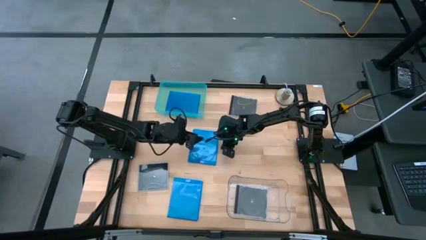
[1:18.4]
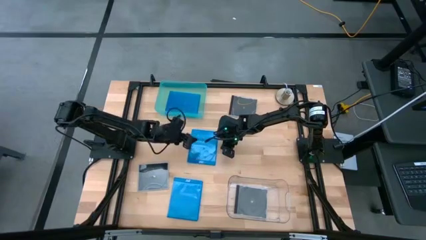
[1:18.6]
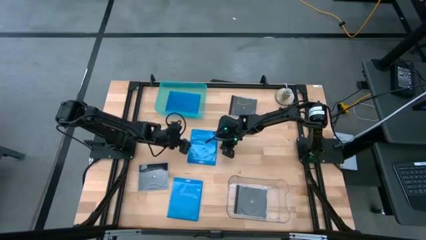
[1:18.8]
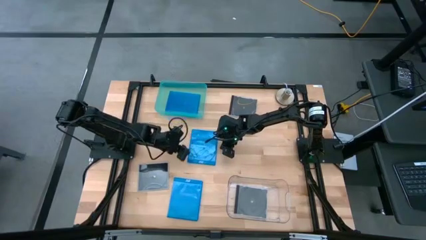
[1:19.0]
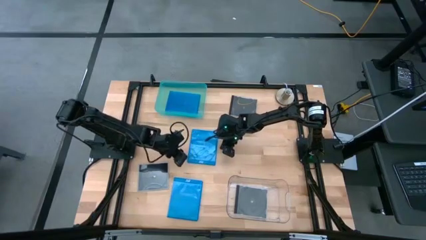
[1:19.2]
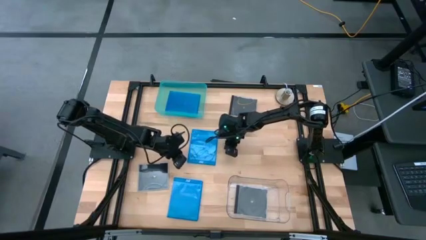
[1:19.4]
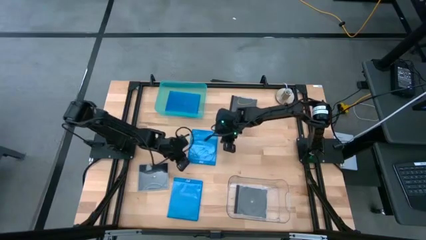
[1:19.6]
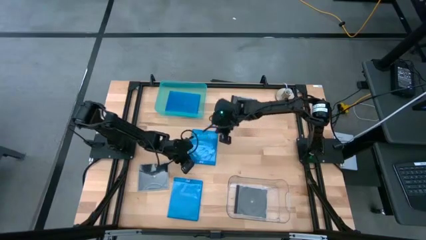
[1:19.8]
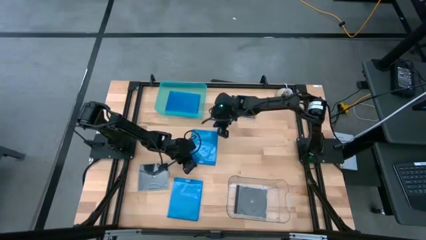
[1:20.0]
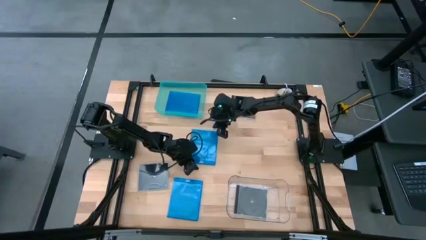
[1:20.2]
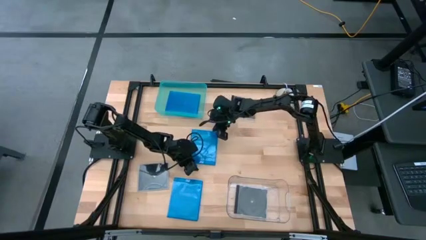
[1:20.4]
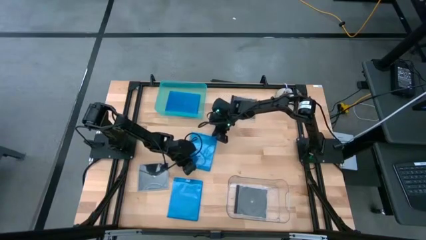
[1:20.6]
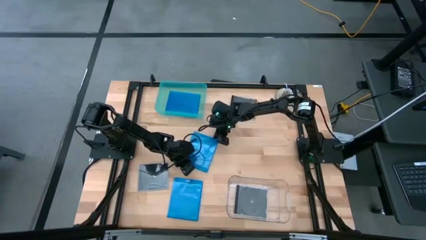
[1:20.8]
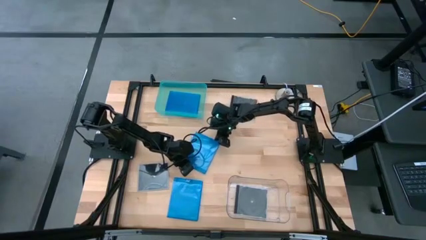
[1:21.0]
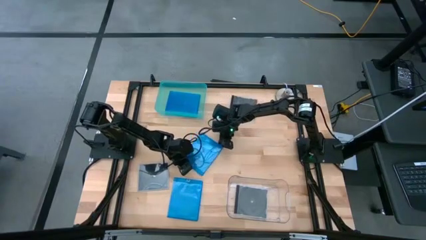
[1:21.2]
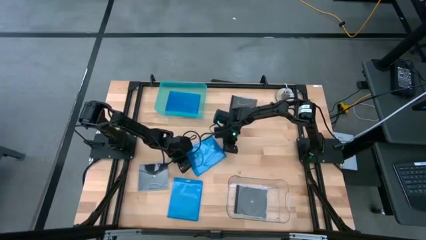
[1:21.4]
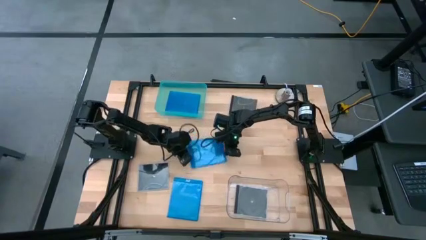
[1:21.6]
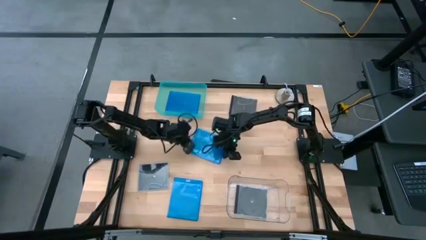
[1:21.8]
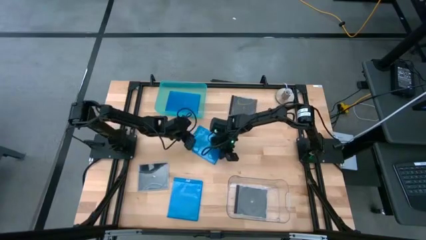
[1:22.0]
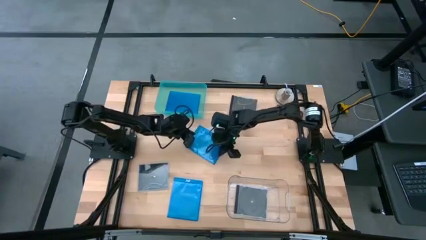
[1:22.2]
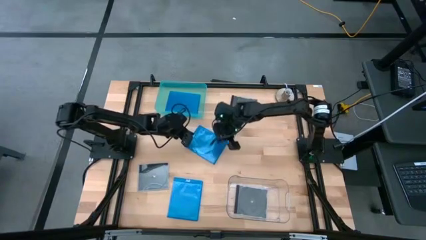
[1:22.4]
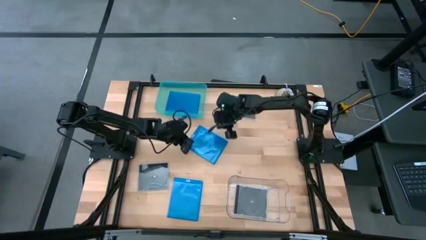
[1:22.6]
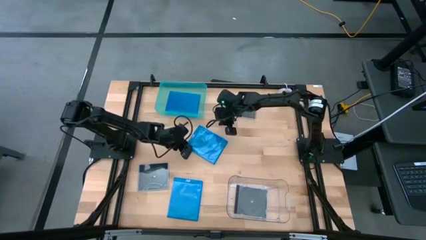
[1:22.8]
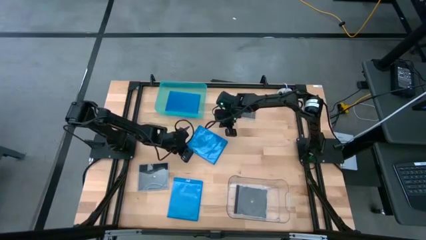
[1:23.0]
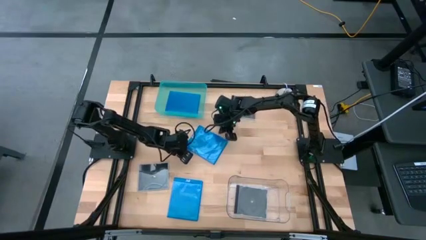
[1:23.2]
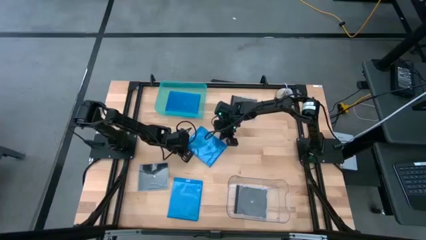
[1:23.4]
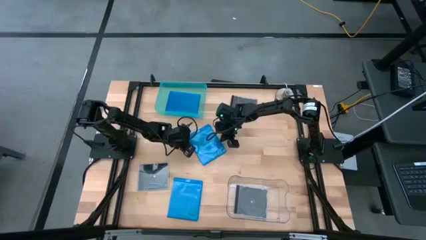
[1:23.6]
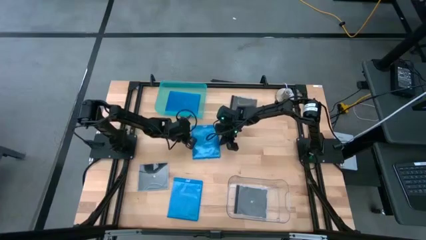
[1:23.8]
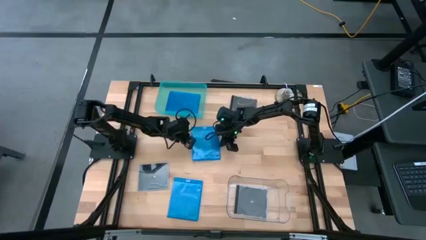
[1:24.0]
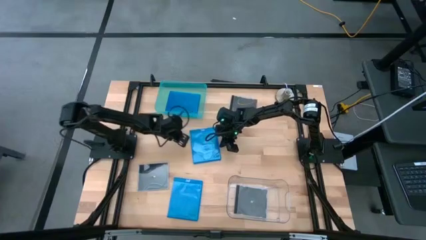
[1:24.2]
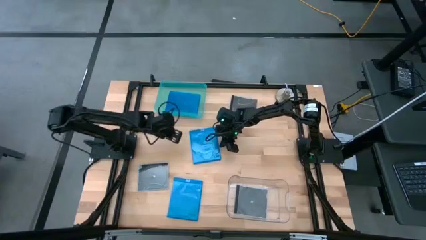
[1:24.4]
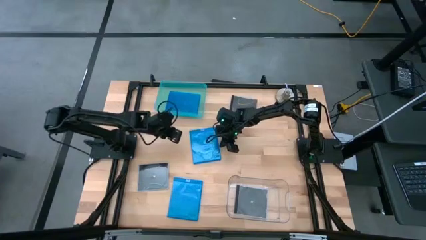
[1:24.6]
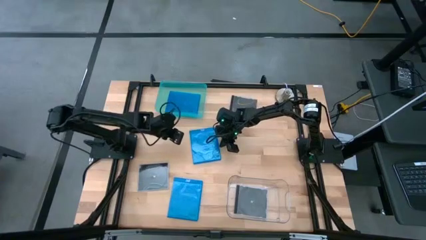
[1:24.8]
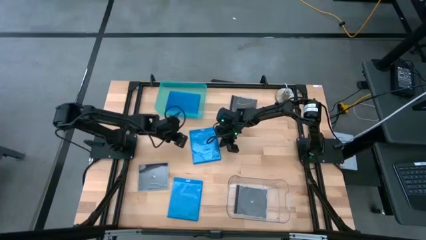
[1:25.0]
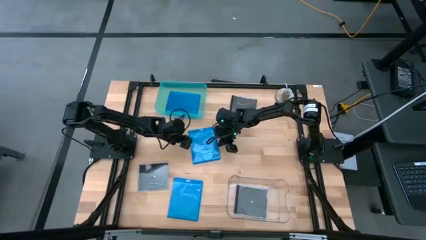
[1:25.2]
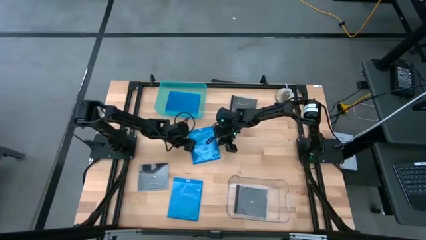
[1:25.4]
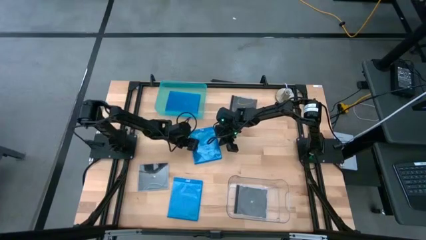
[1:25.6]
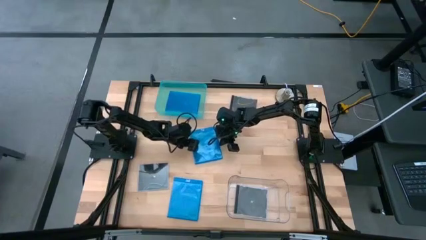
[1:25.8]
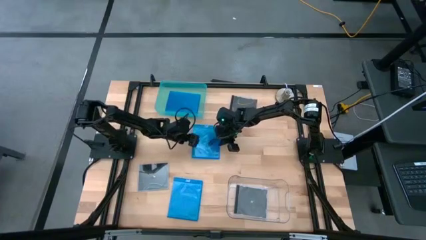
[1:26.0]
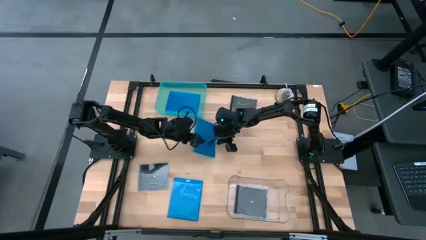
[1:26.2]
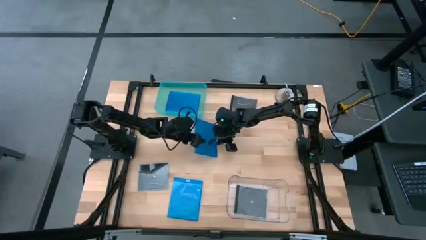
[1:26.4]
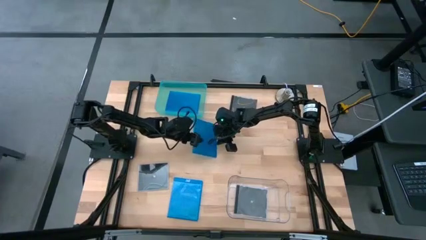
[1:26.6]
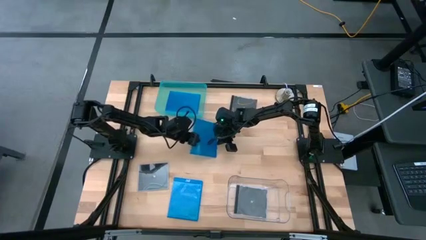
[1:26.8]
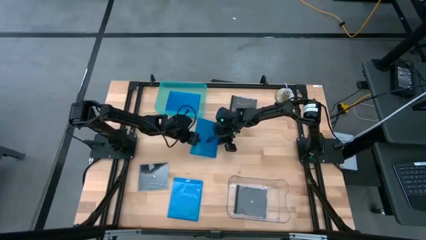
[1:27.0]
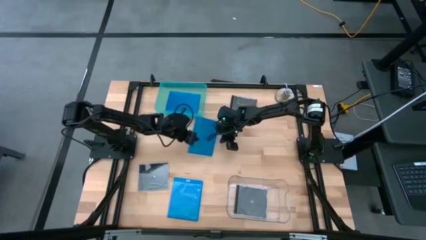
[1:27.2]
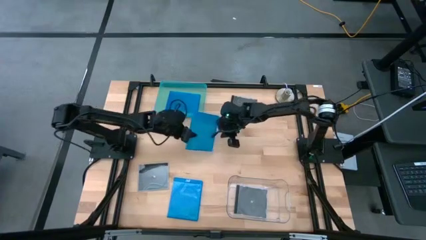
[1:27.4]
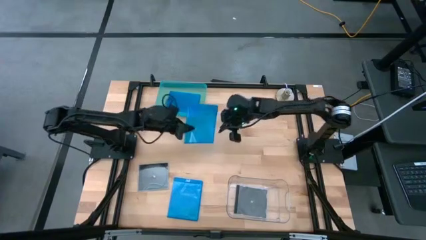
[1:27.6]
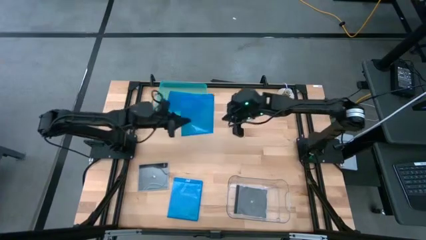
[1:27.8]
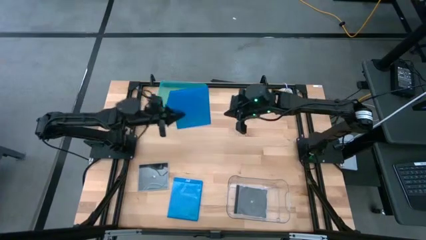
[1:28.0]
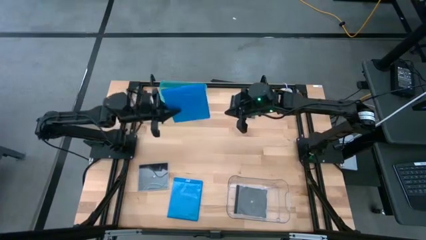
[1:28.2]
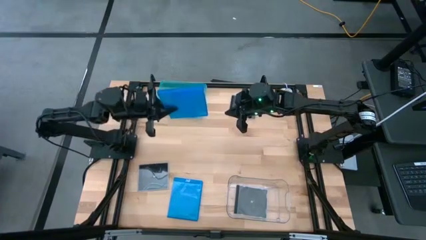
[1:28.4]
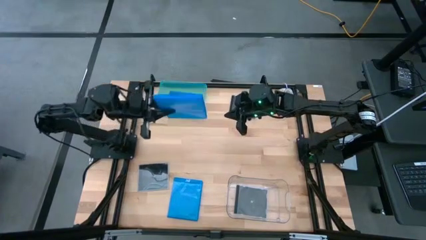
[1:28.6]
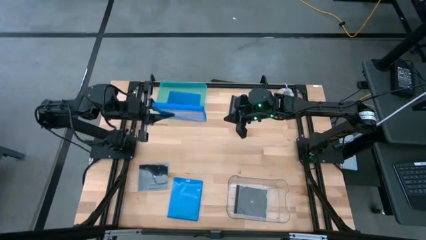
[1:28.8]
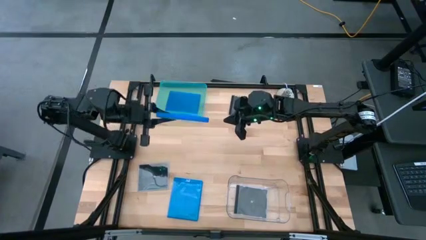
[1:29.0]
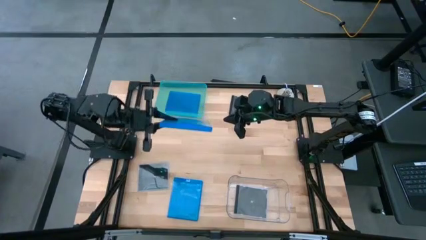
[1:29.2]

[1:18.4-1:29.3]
Task: Pick & place jewel cases by type
Put the top dark blue CD case into the light blue bin

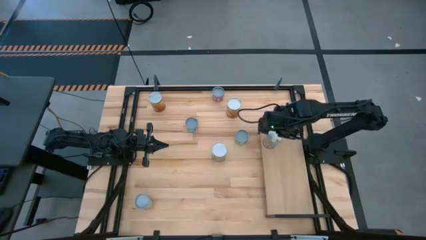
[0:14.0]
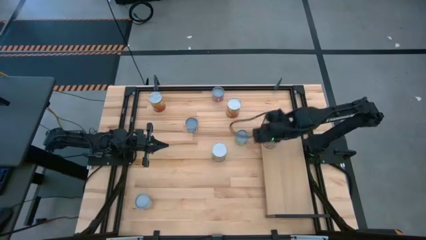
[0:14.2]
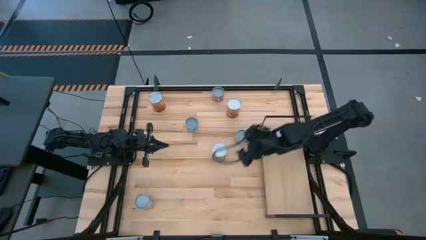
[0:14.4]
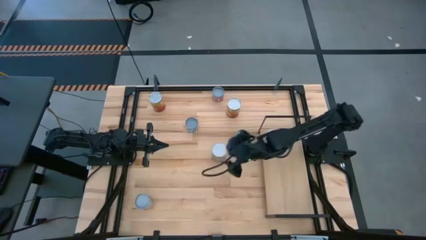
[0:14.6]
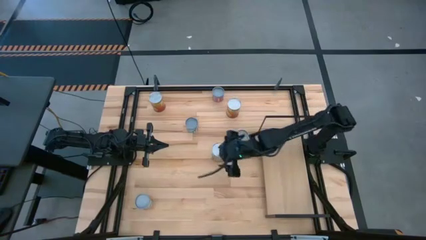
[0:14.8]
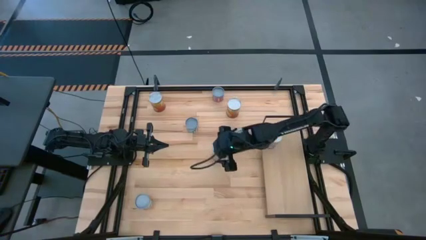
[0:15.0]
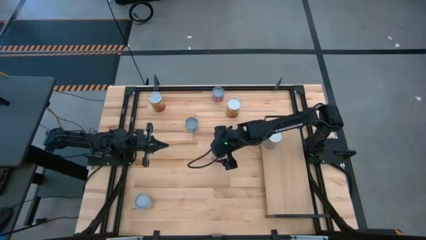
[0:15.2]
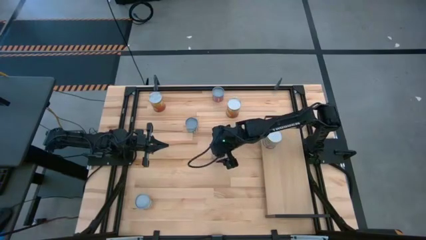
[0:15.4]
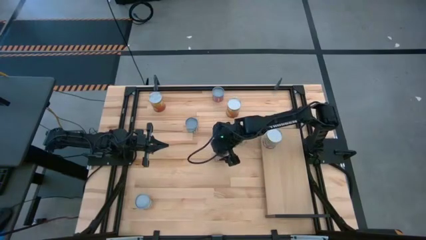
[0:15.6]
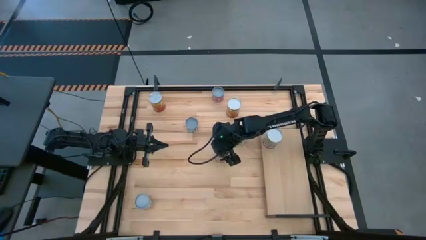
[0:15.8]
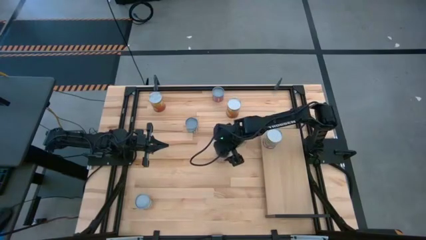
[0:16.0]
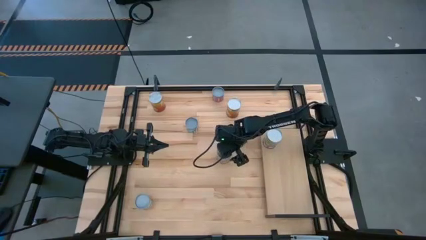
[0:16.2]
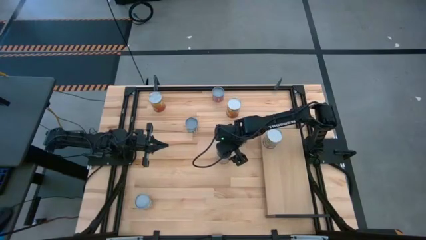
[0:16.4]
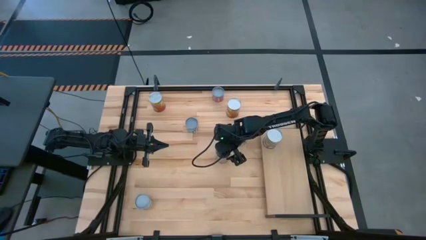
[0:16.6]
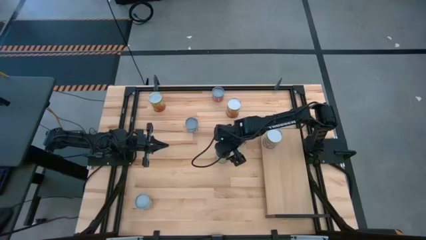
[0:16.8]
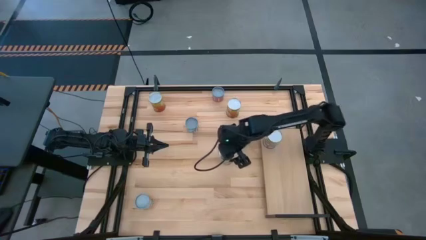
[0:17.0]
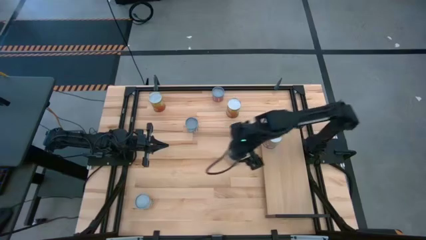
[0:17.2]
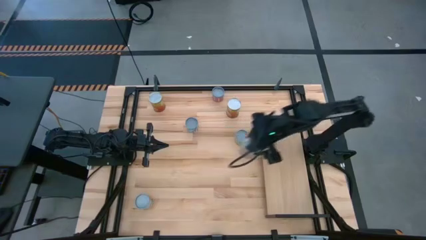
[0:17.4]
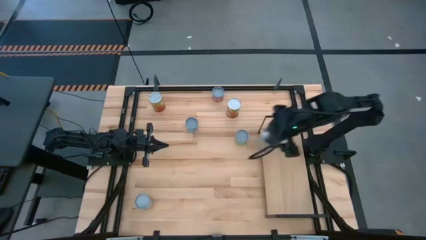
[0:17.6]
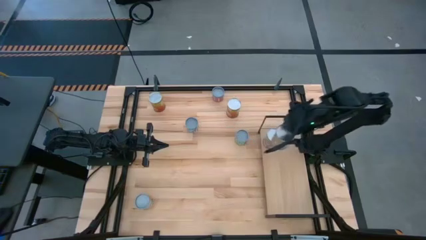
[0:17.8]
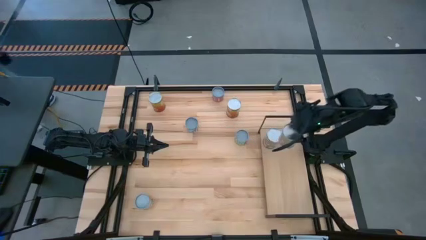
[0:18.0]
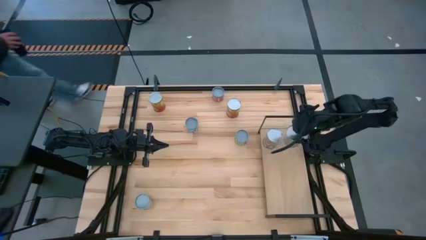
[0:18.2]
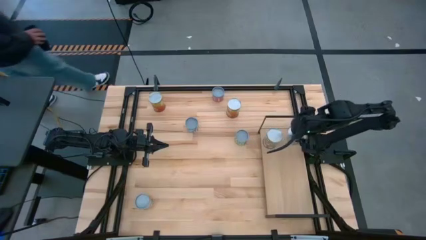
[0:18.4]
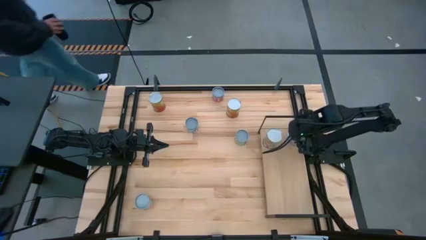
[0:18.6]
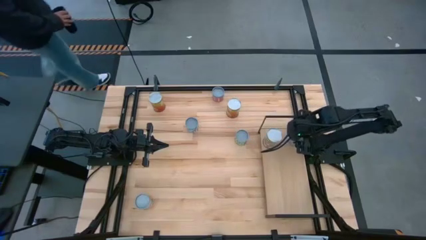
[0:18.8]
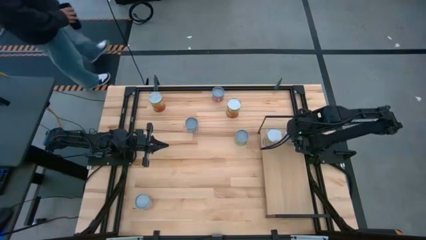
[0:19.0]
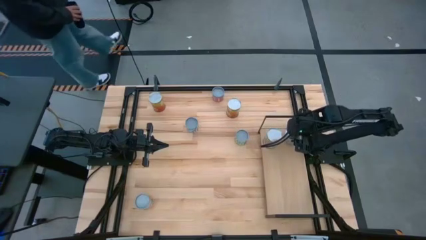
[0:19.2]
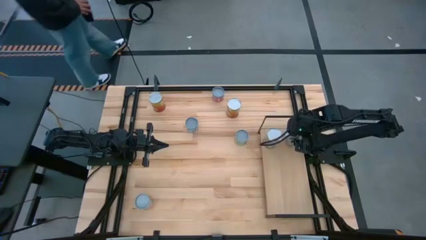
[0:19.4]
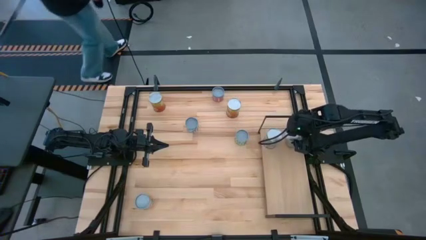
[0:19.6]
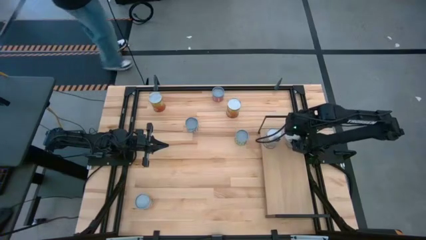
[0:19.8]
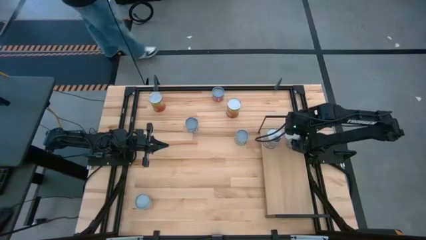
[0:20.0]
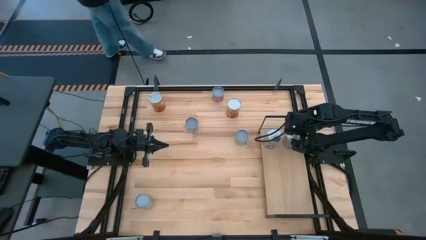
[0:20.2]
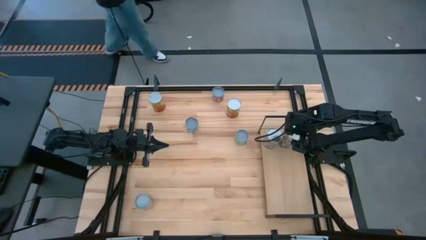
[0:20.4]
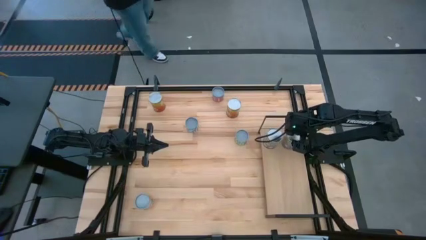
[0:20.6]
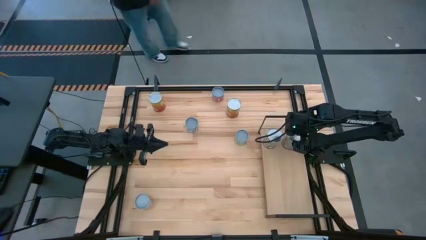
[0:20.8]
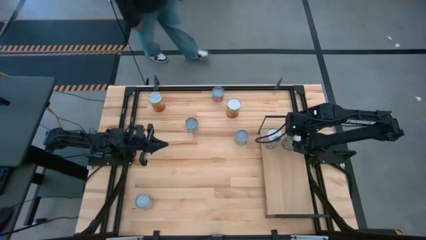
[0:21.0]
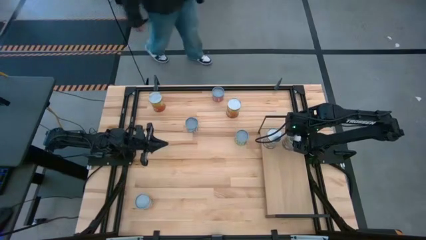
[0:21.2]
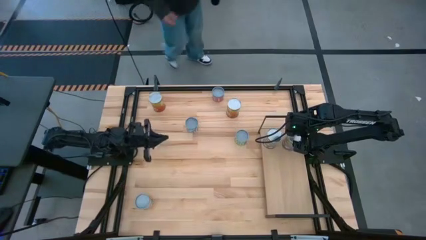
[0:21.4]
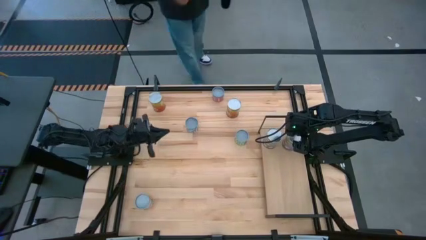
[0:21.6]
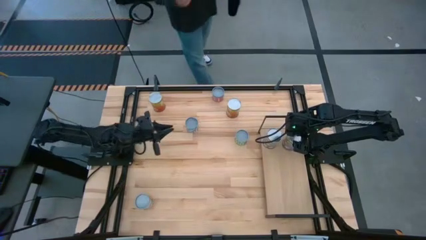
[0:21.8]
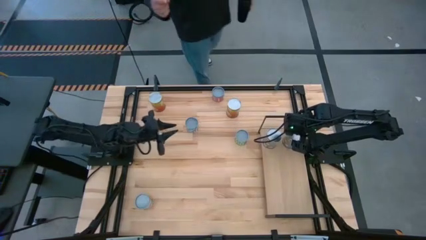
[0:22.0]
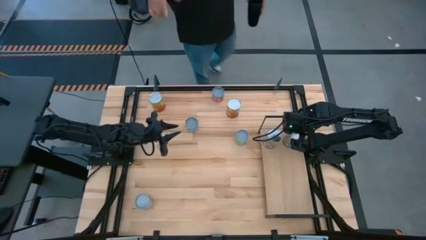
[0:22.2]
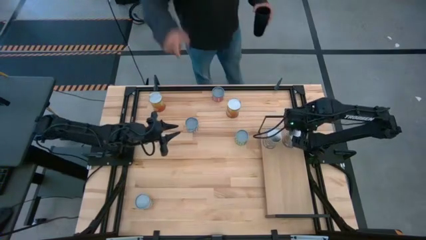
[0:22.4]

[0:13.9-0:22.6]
Task: Pick and place cans onto a shelf
Put the canned peaches on the shelf aligned with the canned peaches
